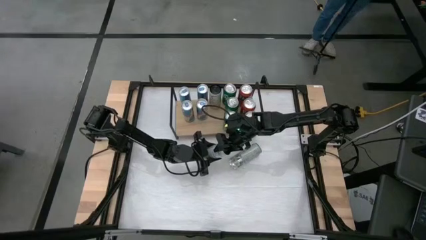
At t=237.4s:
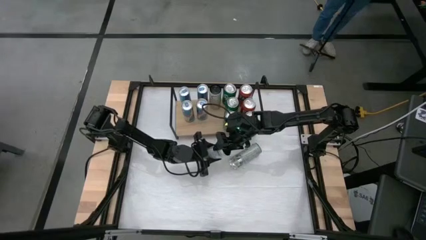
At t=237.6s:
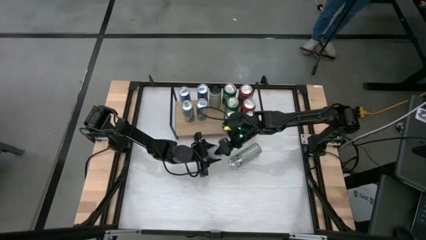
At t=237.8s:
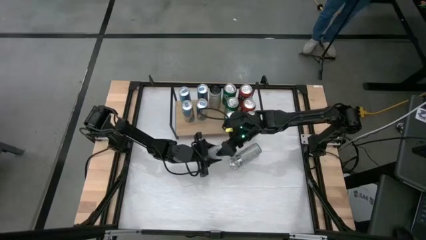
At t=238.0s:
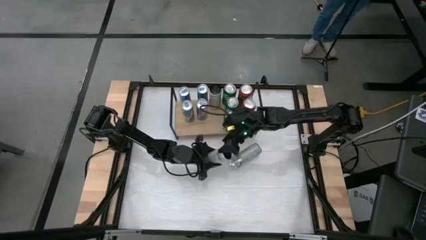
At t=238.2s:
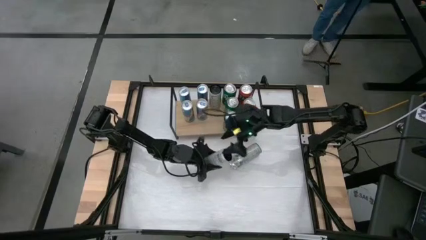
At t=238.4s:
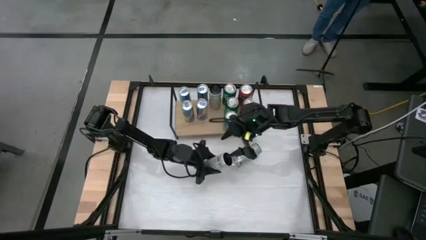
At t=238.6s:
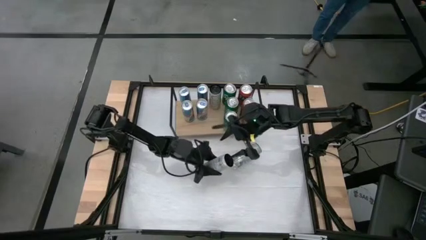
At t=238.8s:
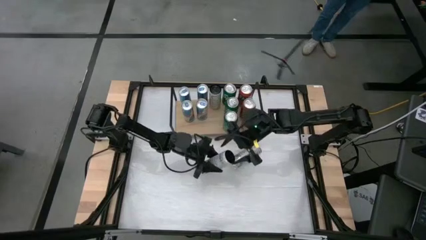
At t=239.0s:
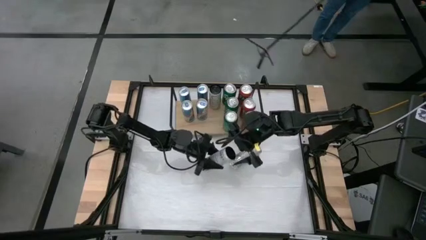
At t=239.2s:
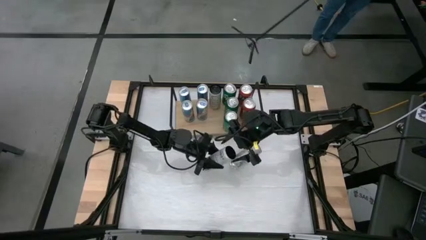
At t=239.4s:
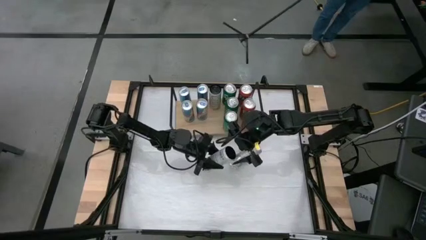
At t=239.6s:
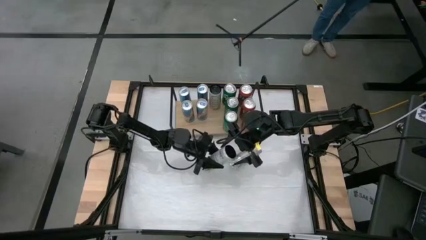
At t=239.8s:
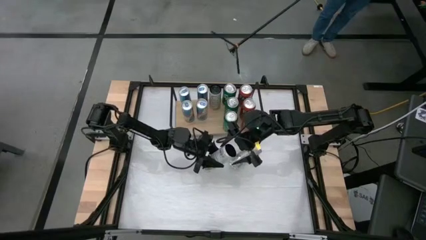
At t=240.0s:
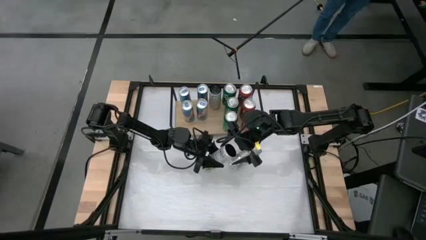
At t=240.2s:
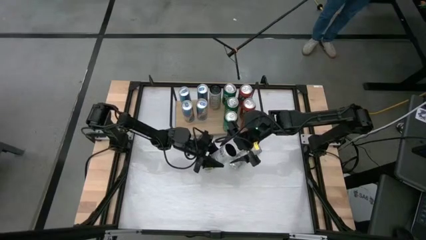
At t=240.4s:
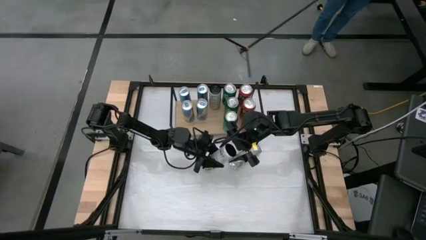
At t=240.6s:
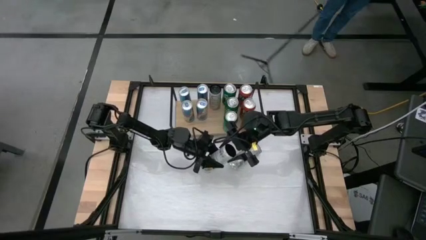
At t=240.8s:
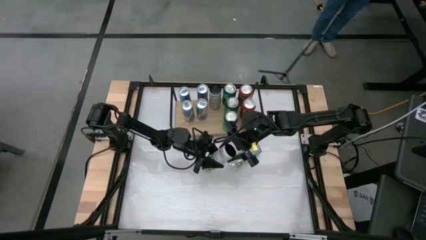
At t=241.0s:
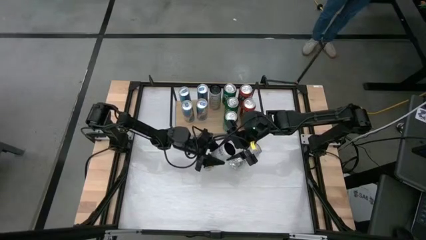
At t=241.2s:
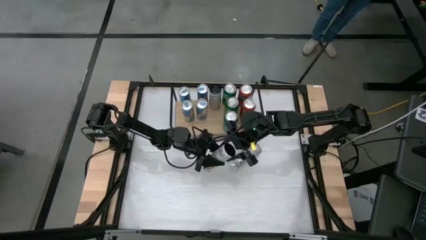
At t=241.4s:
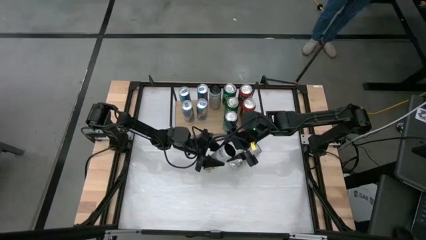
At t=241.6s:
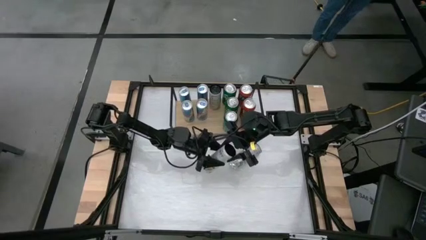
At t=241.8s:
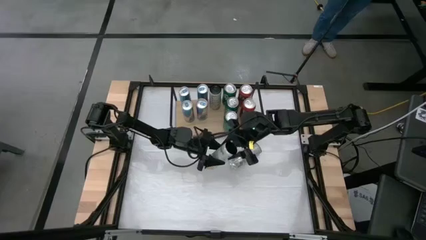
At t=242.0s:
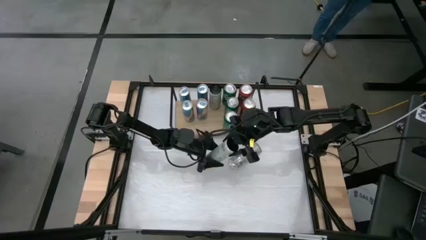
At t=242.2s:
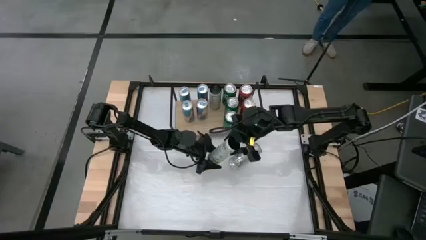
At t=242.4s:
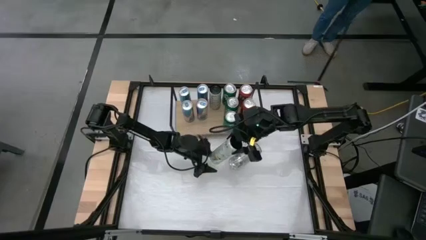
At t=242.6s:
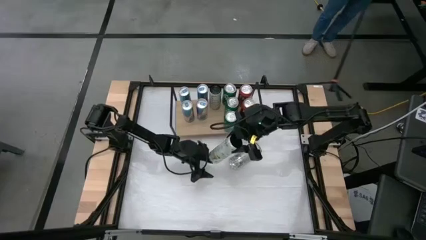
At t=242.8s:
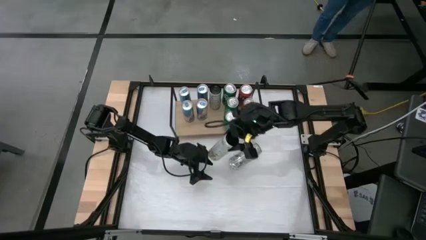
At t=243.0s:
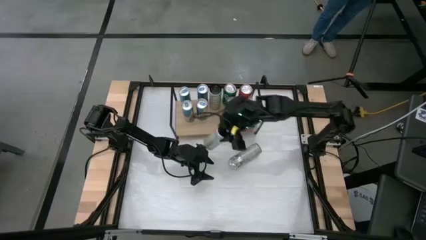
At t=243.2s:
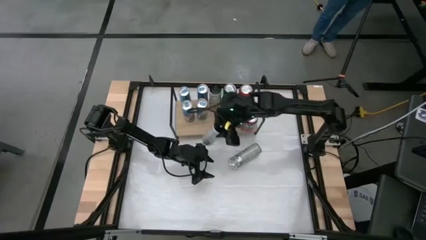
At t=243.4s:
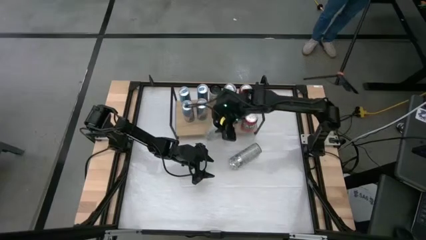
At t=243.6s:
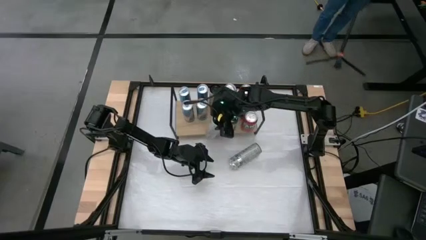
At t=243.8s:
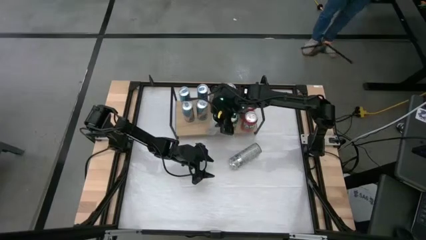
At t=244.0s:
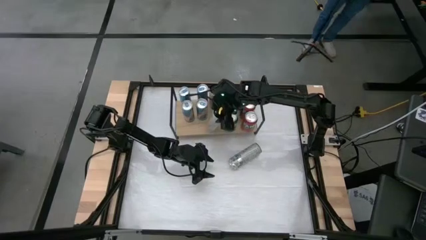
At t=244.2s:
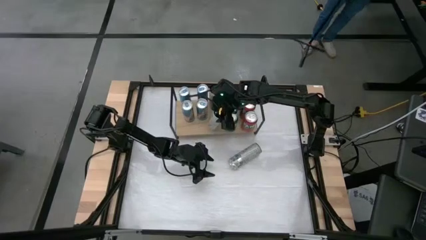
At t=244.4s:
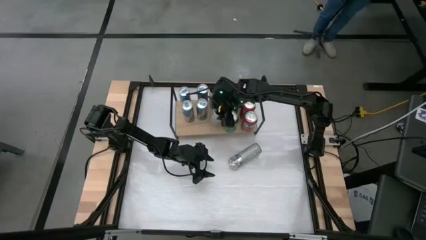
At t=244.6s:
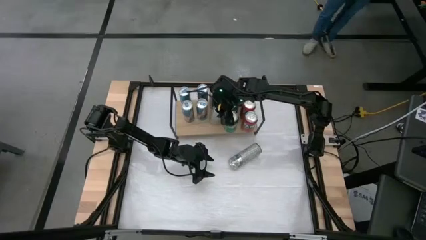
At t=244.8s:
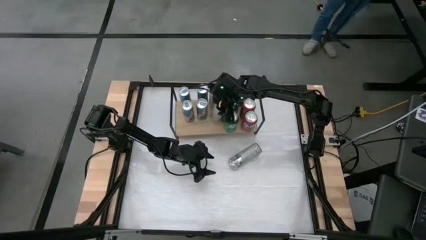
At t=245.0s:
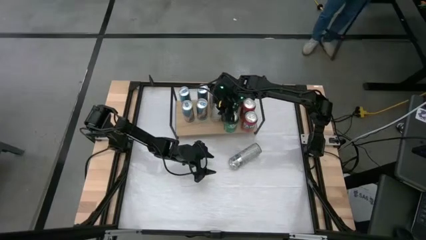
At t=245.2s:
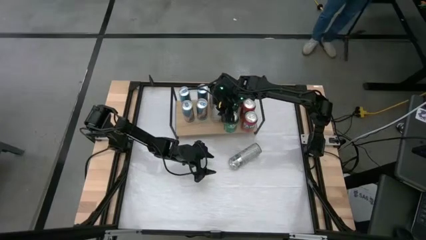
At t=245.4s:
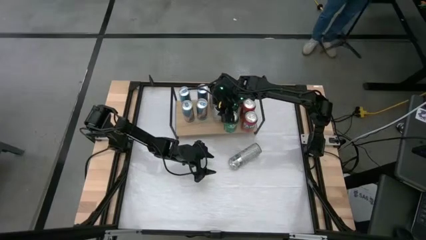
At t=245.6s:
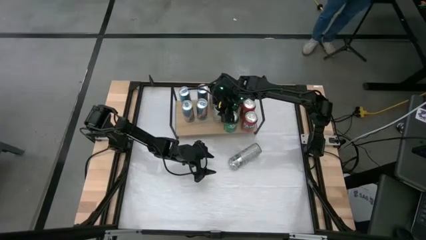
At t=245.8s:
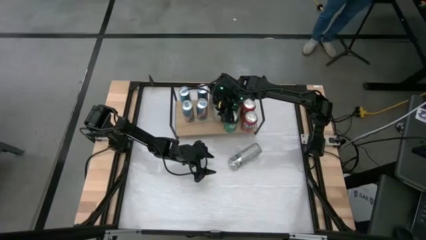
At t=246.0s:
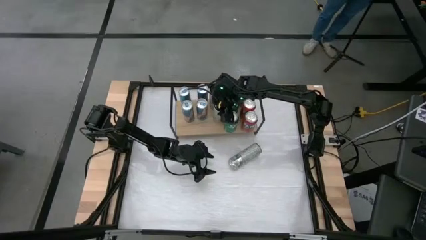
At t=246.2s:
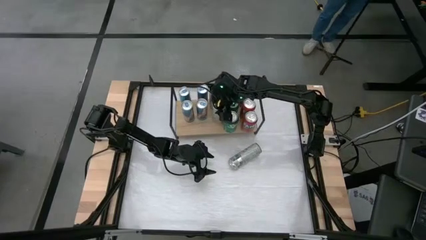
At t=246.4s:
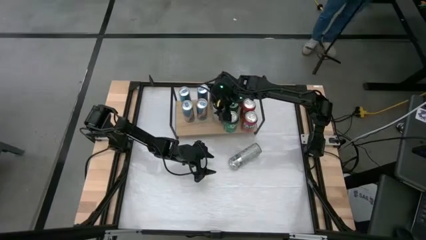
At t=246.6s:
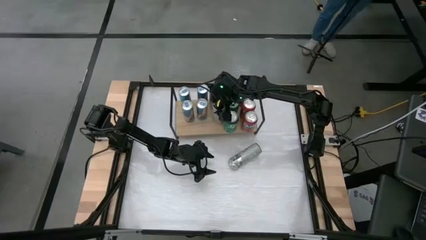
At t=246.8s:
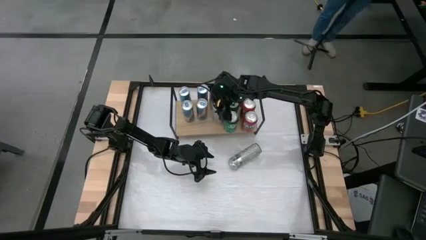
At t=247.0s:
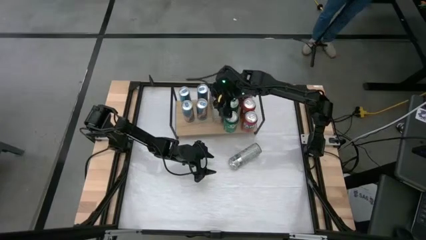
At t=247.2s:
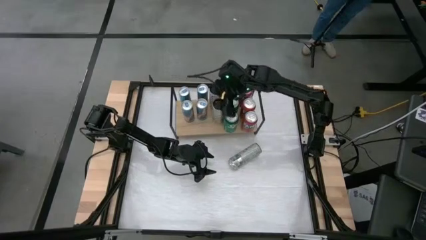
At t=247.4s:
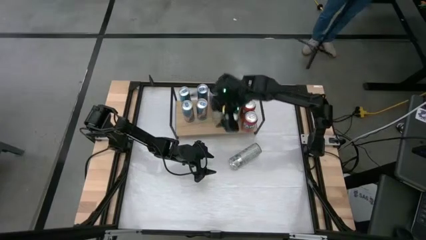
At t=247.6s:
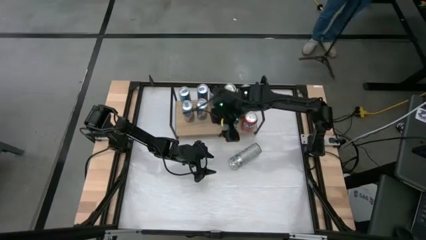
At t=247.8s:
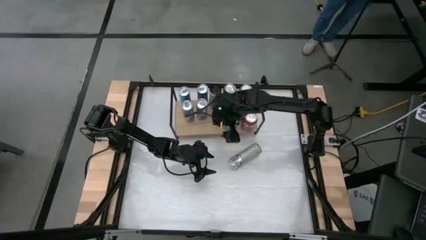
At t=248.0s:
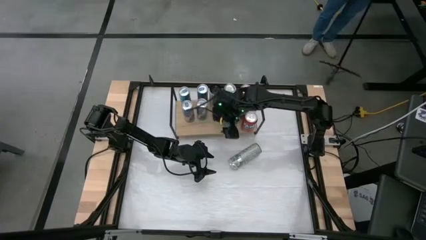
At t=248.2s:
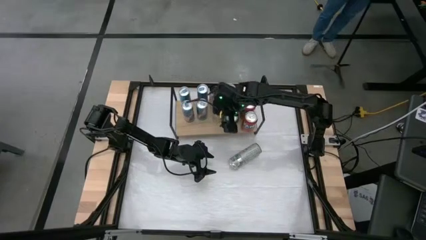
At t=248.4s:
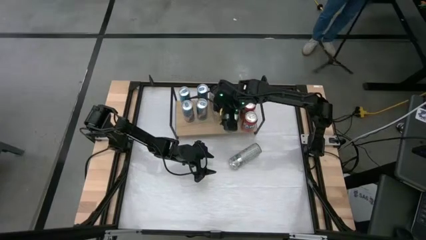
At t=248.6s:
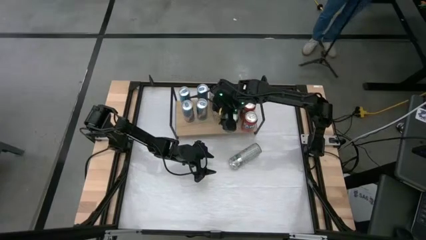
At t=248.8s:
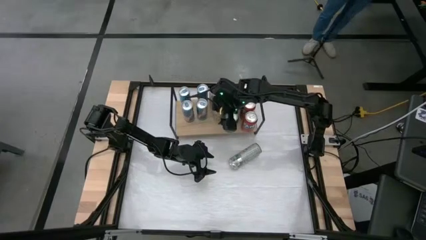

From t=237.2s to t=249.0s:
Task: Sort soda cans
Put the white-yellow soda can on the shelf and align with the other white-yellow soda can
